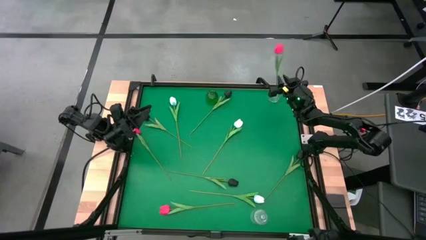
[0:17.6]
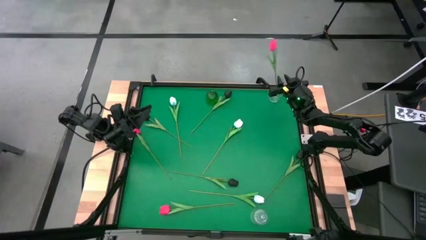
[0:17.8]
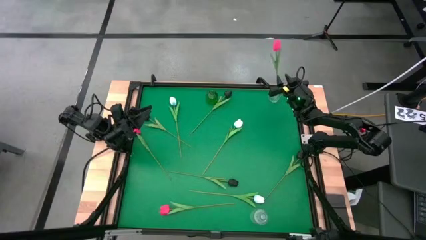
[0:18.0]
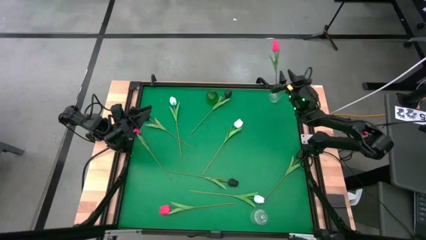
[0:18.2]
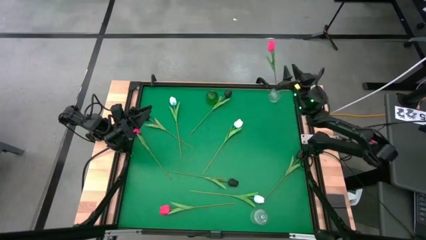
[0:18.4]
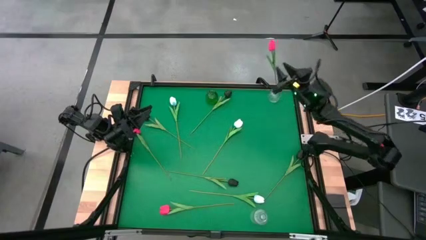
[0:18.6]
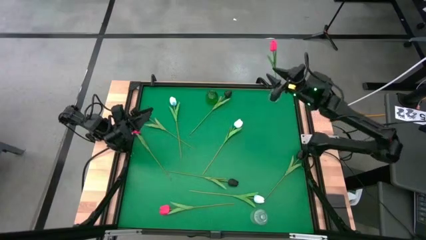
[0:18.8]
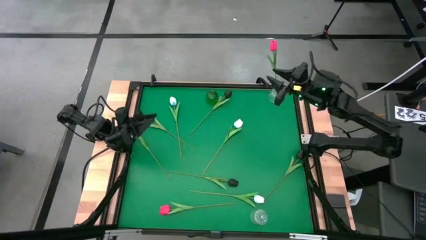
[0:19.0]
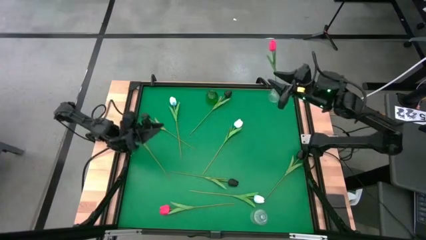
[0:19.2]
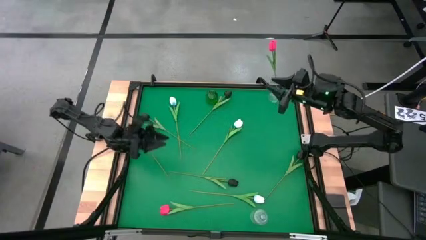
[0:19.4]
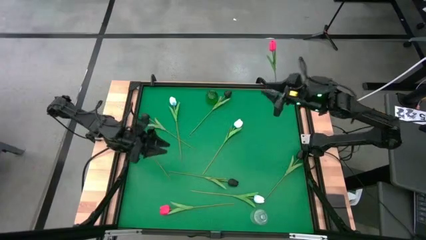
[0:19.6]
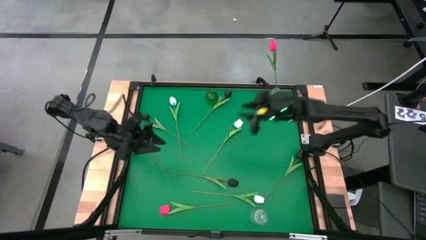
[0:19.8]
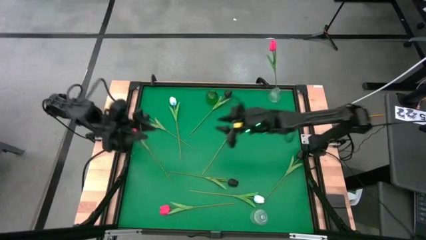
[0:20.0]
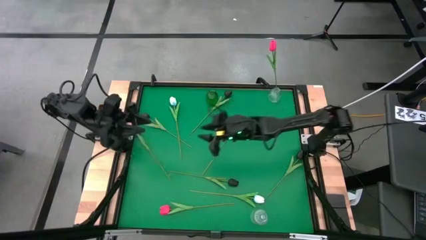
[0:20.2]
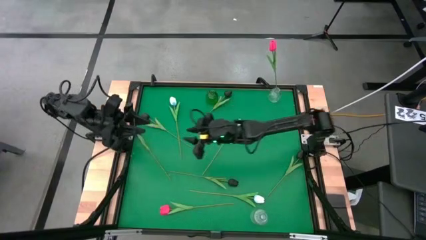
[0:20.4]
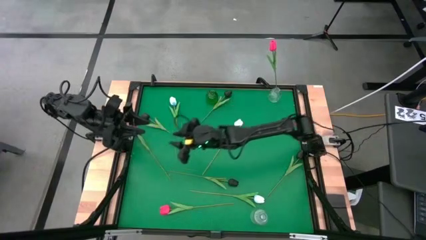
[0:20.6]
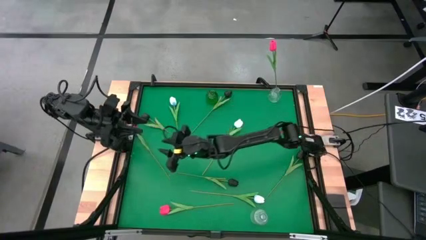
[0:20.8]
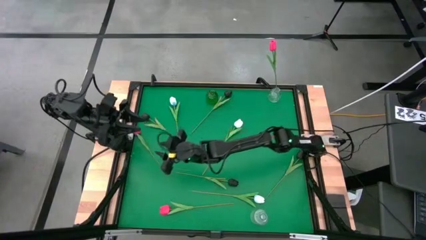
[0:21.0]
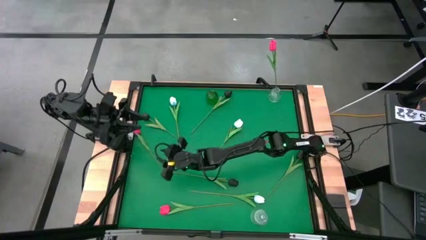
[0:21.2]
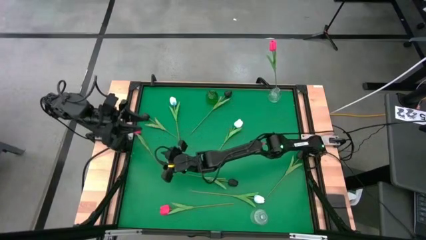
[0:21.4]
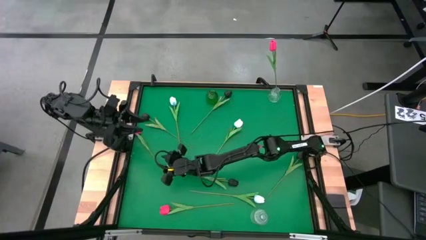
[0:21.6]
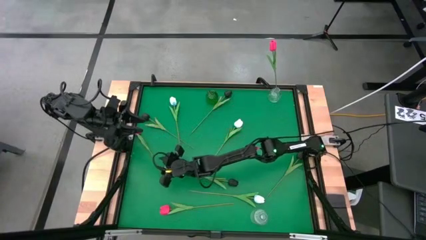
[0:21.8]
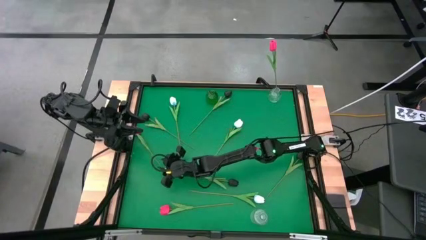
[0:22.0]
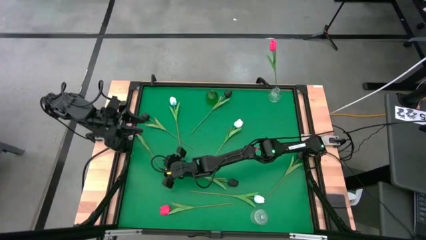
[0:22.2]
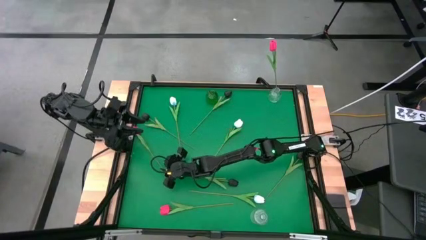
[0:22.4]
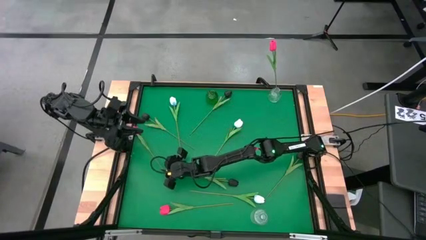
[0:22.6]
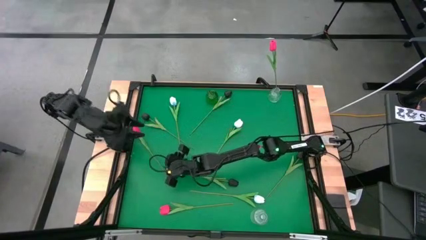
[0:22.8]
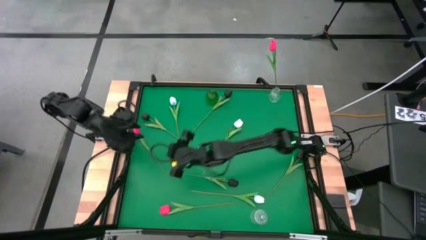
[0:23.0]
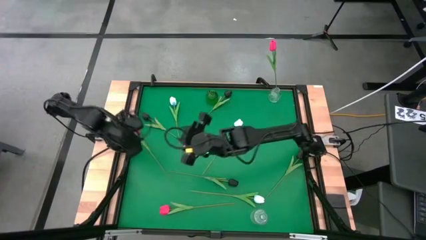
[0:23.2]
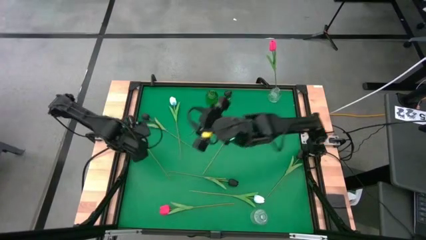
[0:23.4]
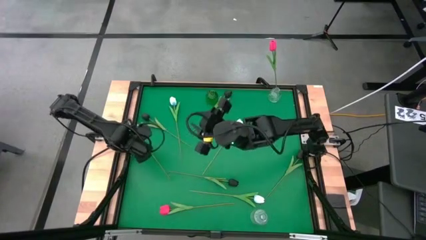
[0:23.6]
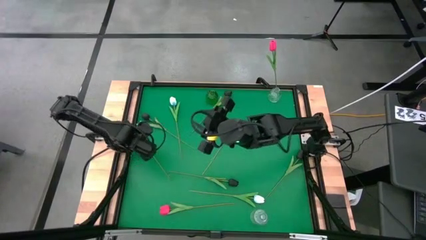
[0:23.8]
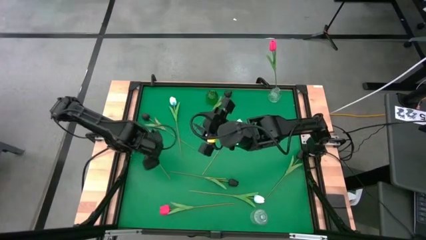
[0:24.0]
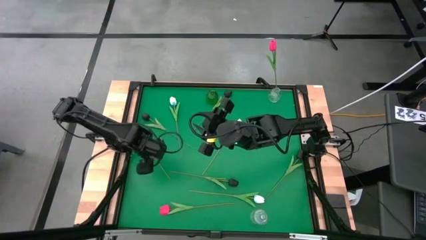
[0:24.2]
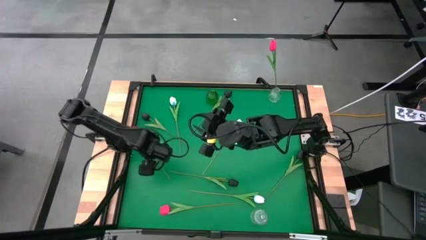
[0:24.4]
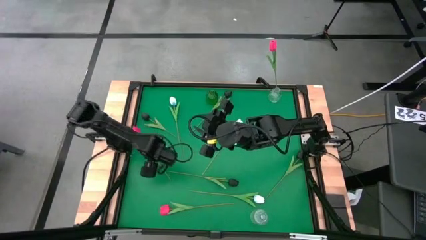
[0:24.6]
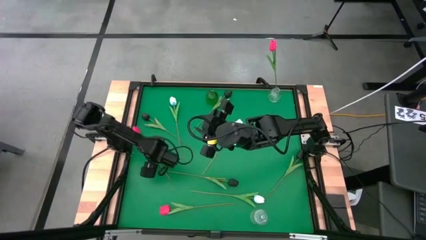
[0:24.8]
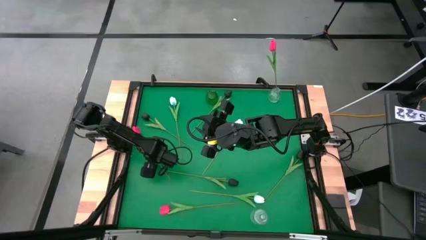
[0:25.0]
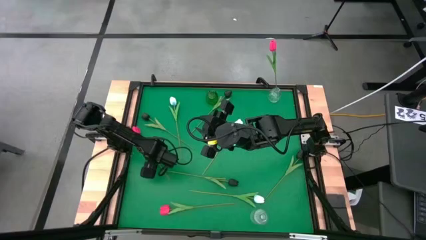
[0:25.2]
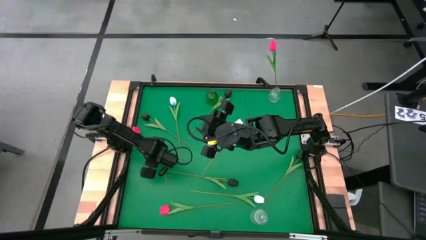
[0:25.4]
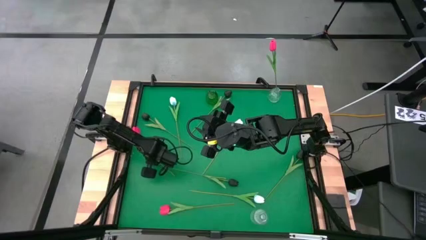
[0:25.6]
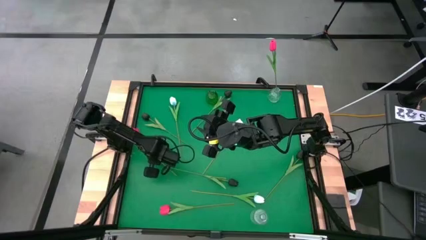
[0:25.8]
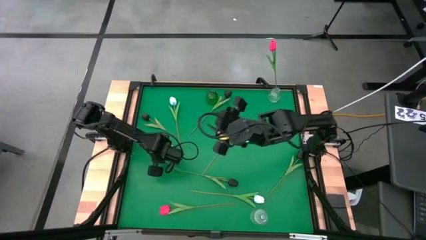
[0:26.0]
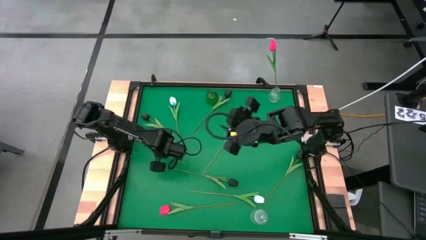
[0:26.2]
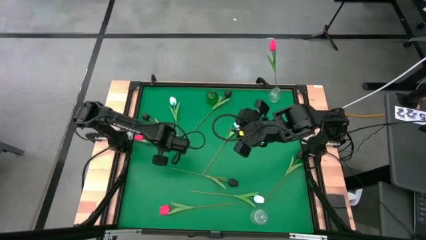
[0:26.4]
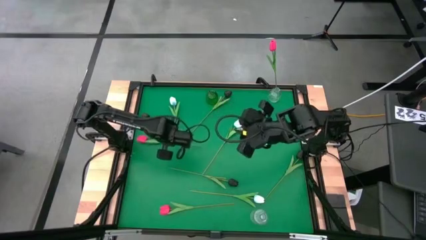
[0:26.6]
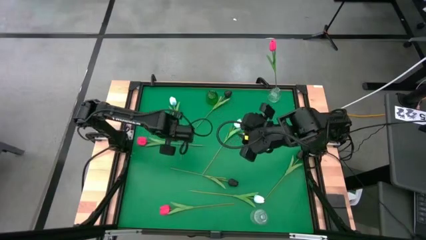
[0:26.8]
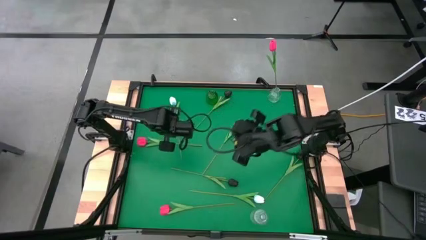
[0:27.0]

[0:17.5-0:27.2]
Task: Sort flowers into vase by color
Put the pink tulip into the top transparent vase

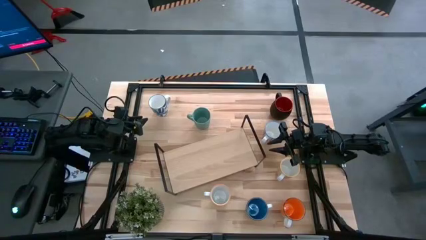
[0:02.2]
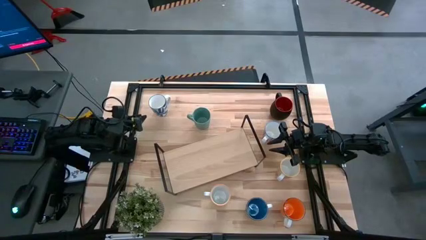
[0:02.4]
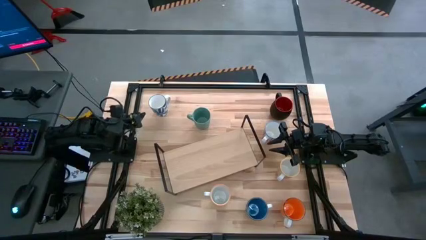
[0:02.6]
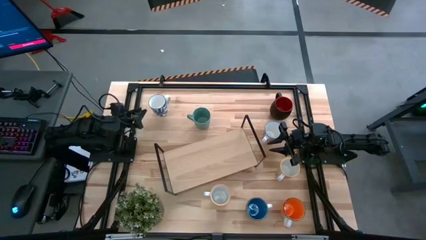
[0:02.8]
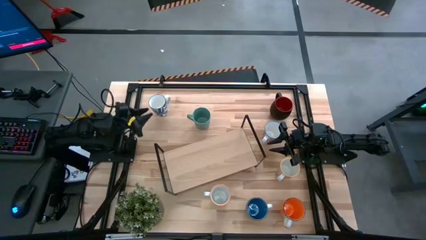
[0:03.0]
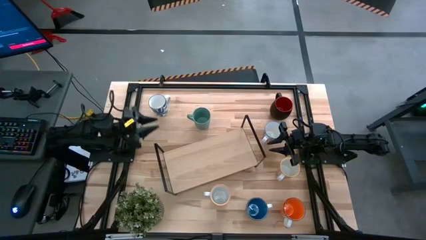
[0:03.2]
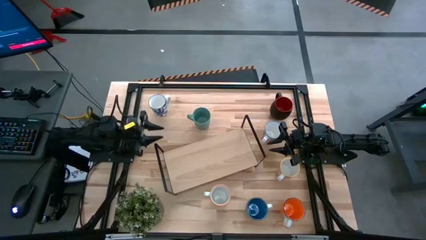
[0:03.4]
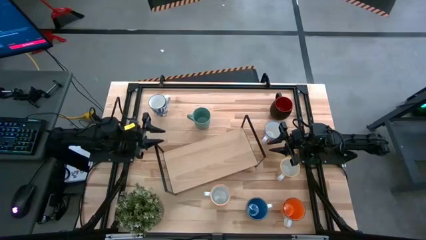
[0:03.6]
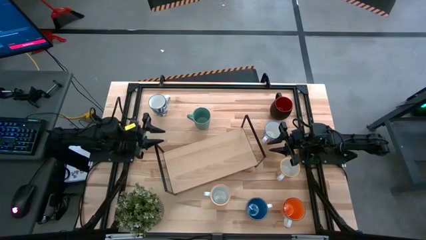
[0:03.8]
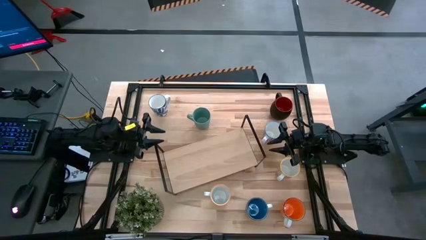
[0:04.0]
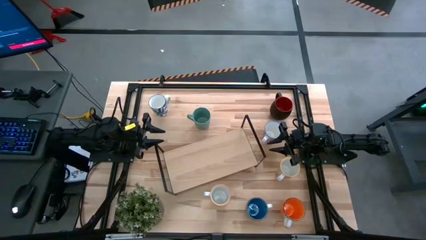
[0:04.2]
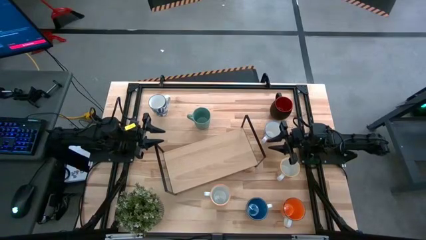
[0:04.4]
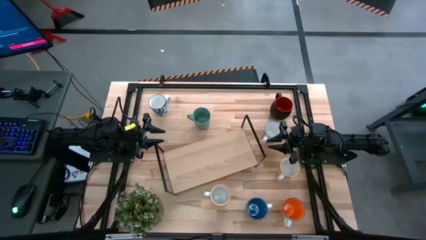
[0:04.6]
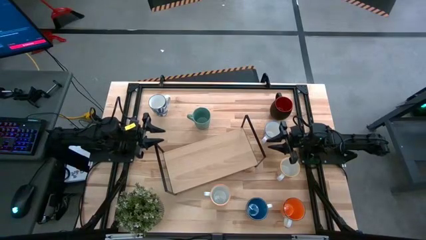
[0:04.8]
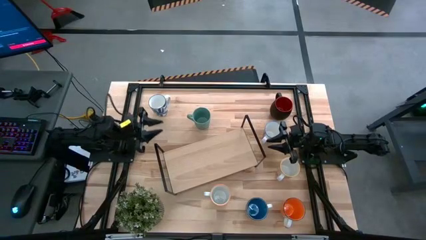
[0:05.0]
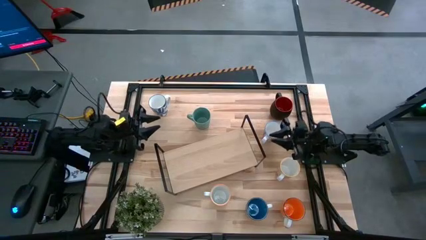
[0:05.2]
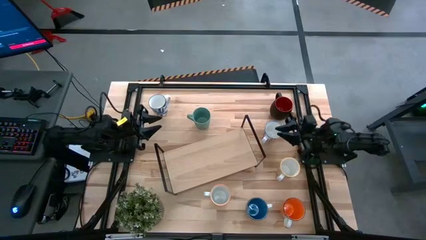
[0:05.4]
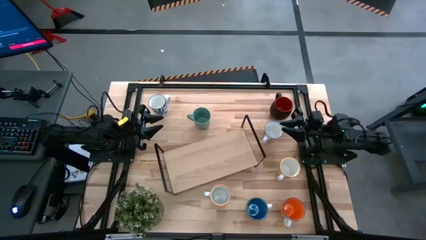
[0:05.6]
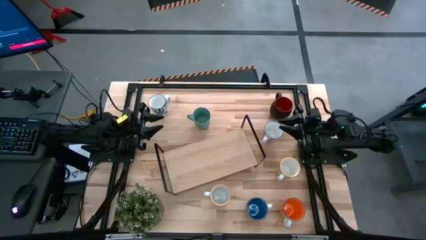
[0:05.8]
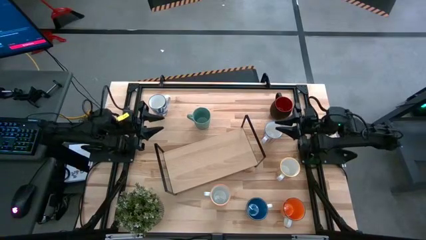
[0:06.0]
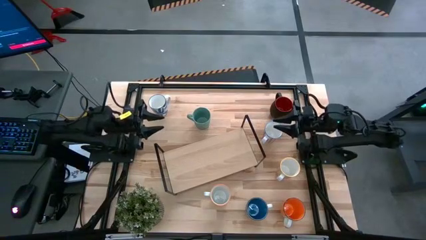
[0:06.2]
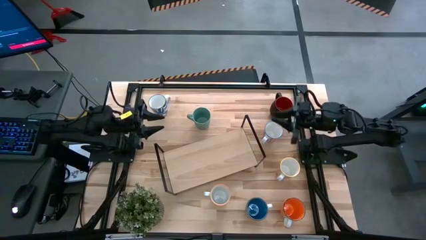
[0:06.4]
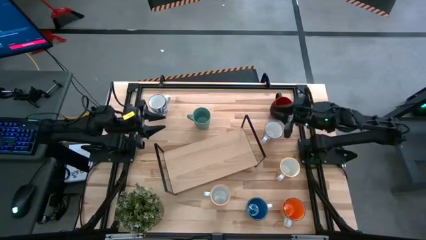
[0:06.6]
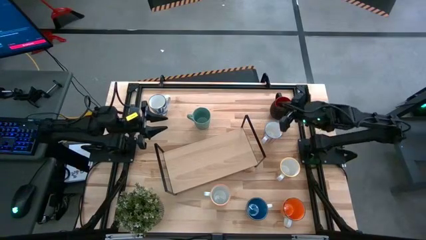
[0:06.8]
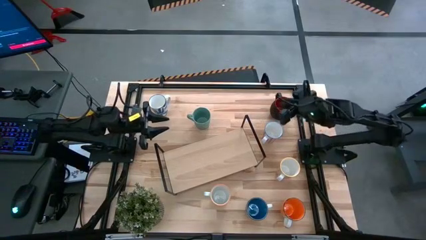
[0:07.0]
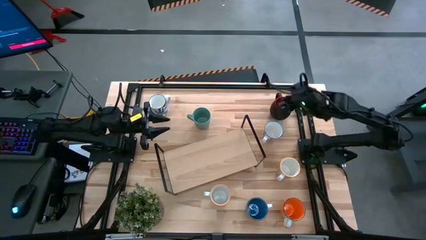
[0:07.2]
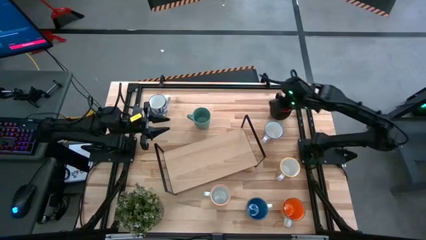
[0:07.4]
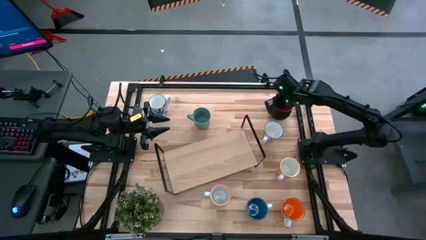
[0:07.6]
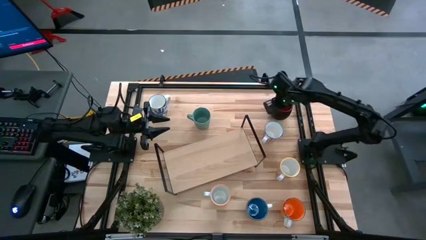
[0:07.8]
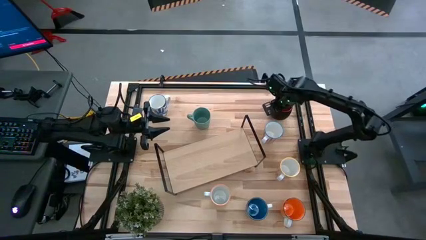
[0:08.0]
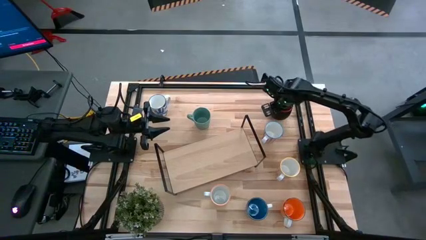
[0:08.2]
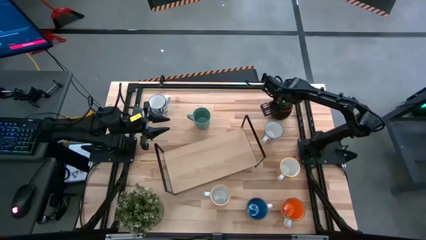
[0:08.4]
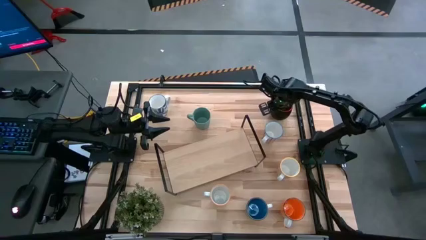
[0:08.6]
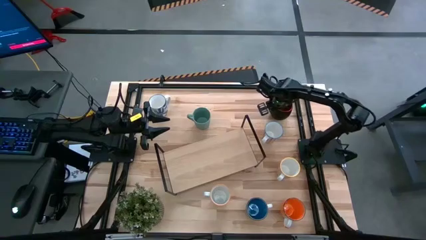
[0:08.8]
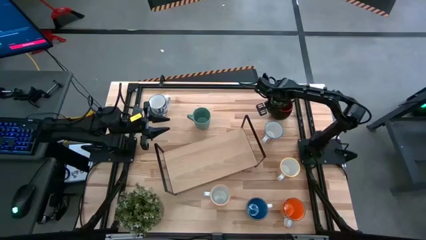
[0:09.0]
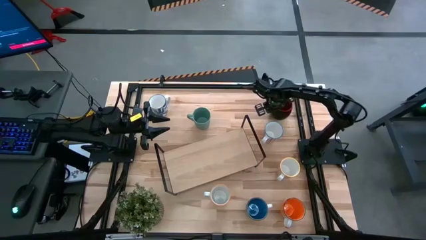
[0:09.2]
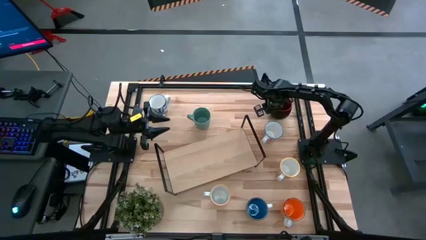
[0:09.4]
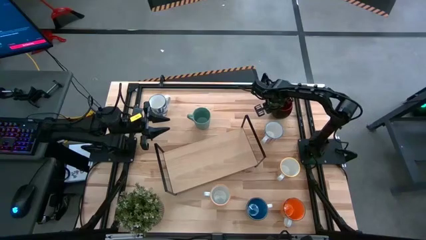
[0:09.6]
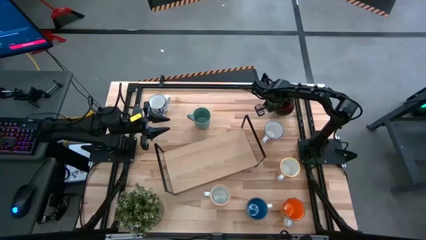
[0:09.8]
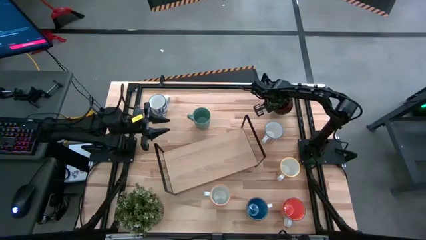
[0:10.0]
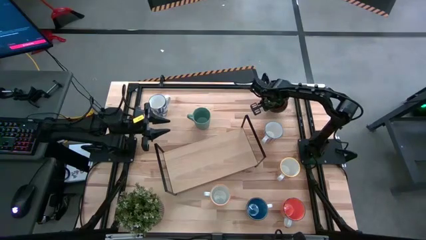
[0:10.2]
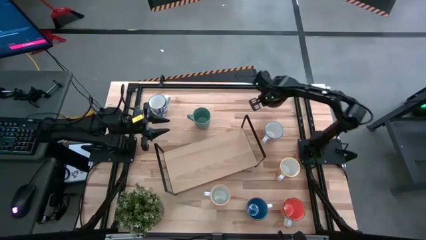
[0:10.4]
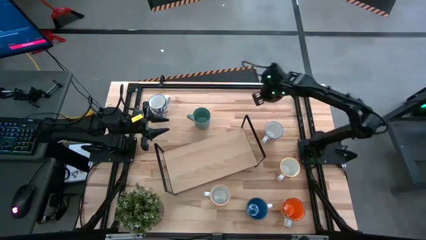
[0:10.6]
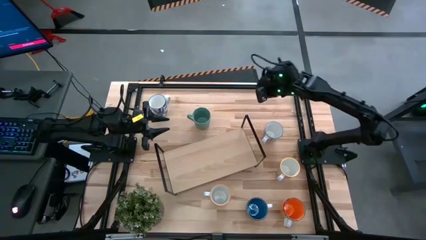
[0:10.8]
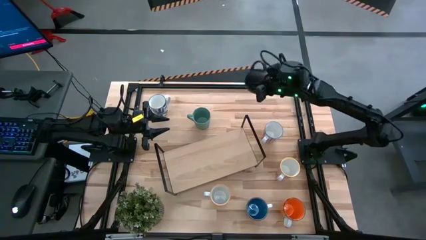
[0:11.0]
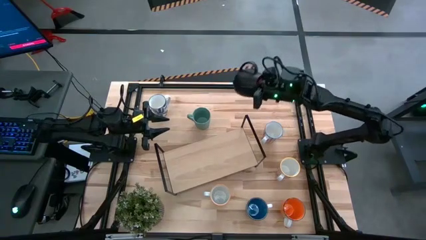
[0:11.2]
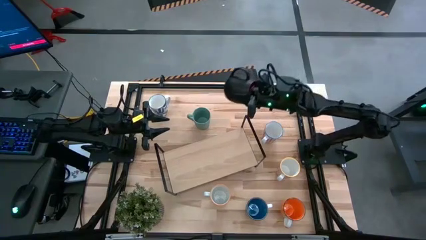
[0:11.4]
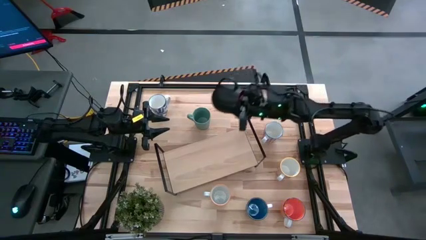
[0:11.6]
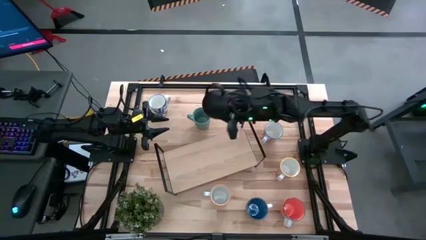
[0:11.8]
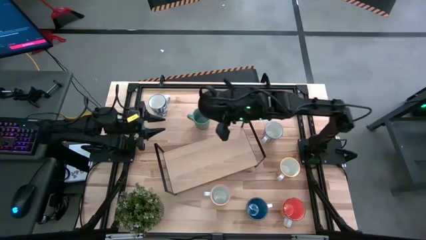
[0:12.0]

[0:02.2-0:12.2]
Task: Place coffee mugs
Put the black mug on the shelf
